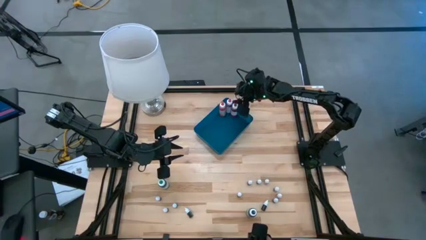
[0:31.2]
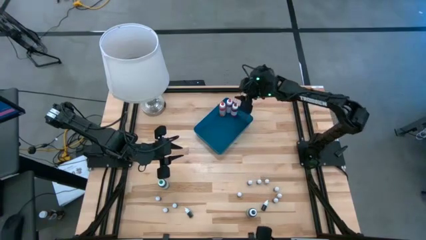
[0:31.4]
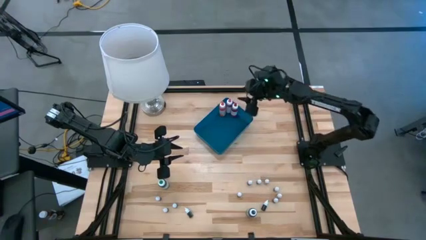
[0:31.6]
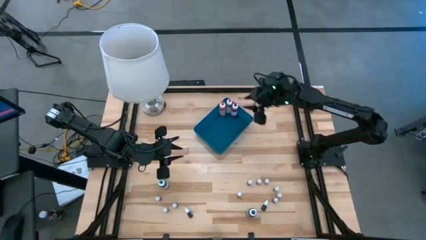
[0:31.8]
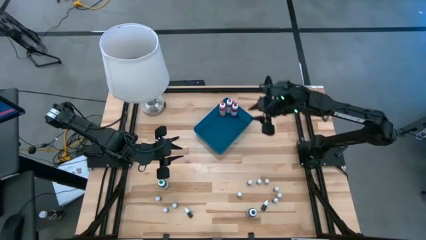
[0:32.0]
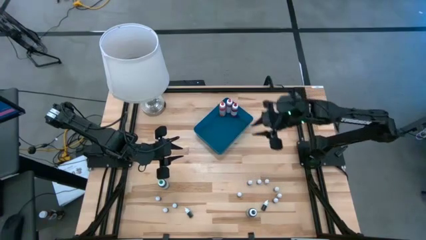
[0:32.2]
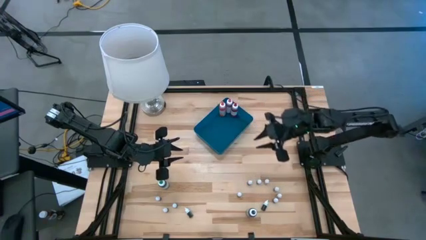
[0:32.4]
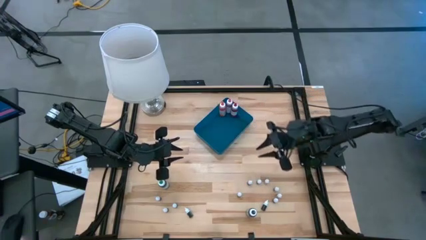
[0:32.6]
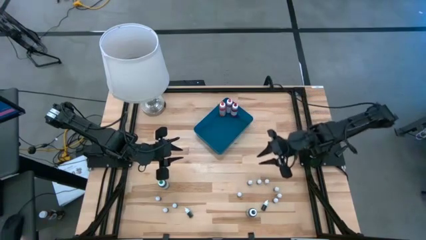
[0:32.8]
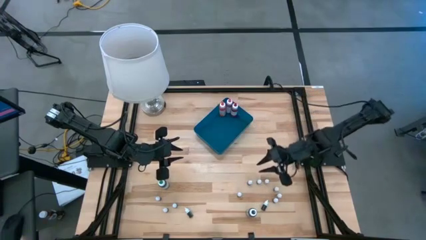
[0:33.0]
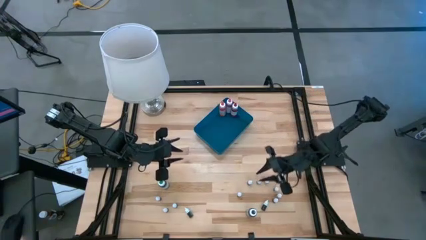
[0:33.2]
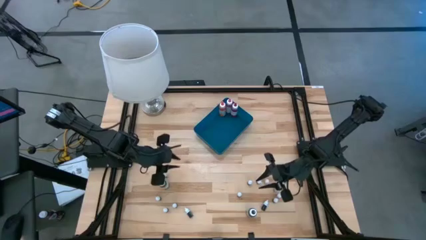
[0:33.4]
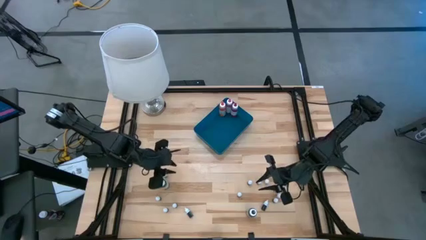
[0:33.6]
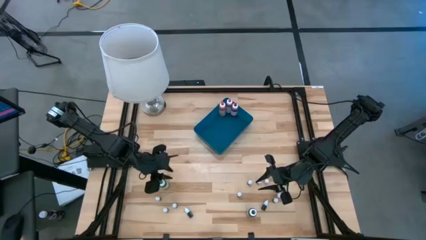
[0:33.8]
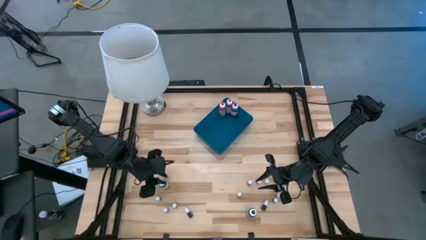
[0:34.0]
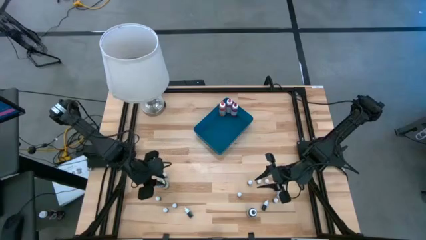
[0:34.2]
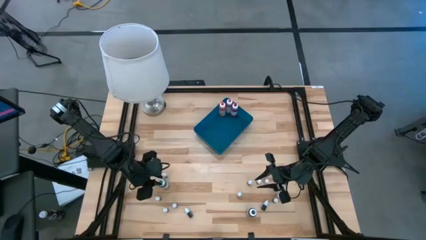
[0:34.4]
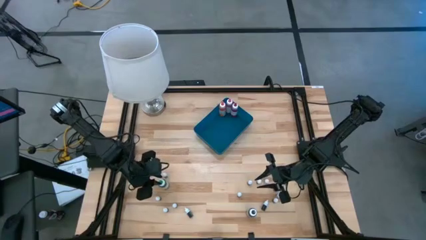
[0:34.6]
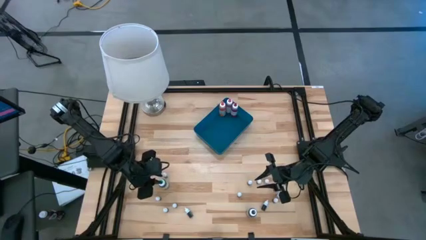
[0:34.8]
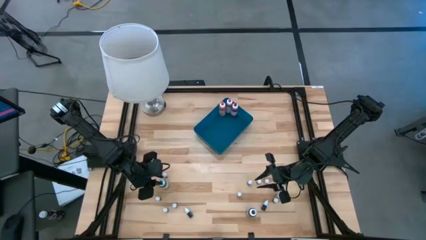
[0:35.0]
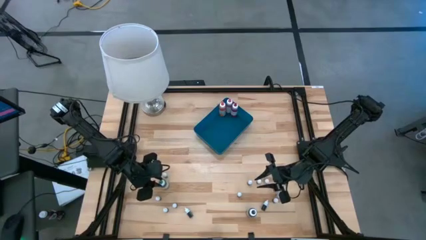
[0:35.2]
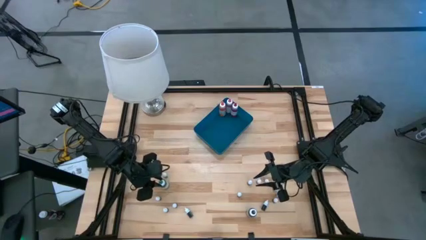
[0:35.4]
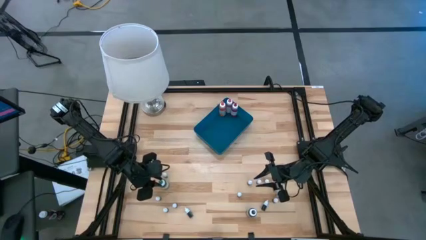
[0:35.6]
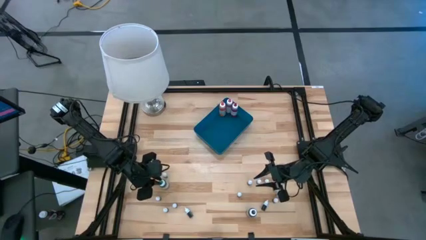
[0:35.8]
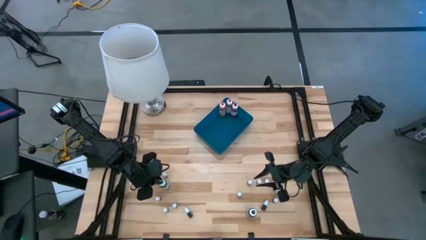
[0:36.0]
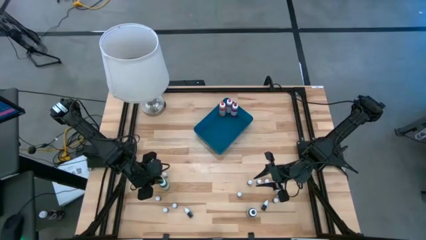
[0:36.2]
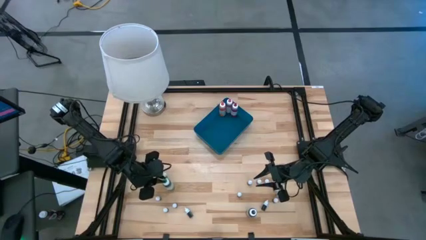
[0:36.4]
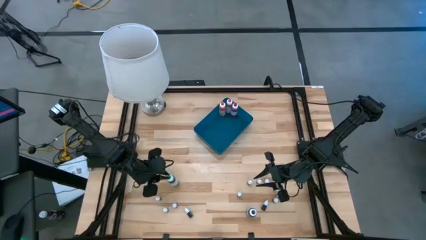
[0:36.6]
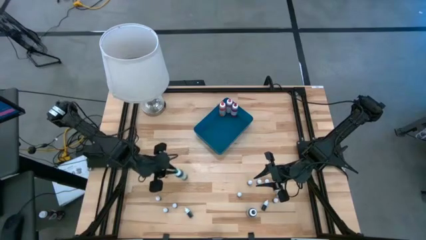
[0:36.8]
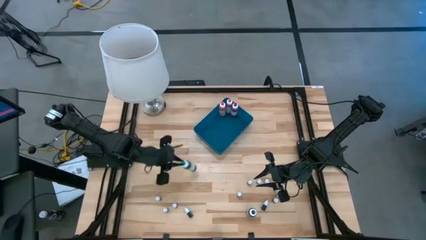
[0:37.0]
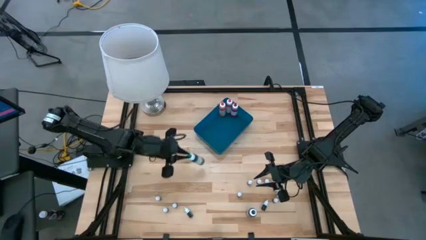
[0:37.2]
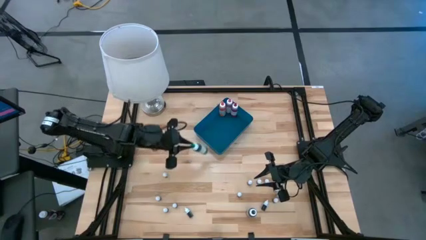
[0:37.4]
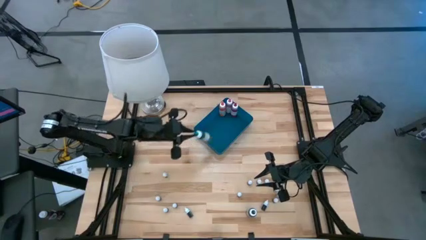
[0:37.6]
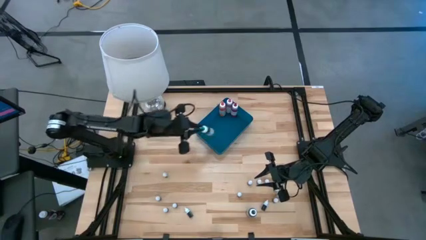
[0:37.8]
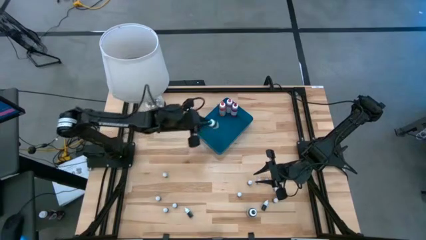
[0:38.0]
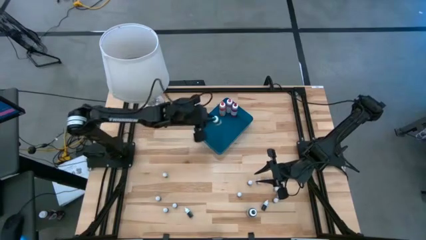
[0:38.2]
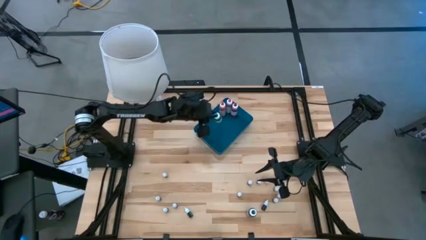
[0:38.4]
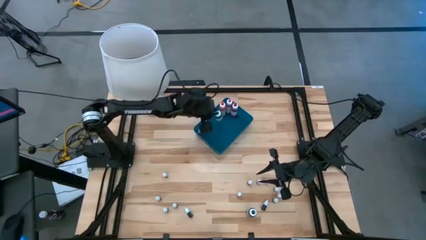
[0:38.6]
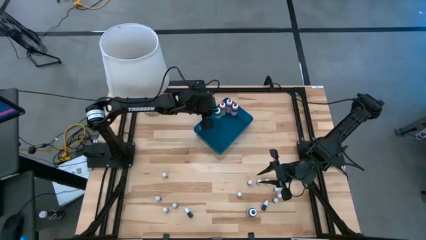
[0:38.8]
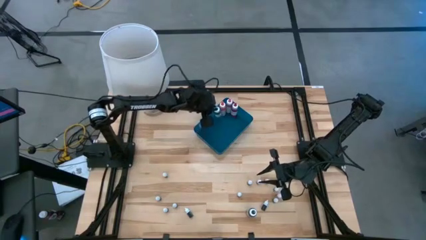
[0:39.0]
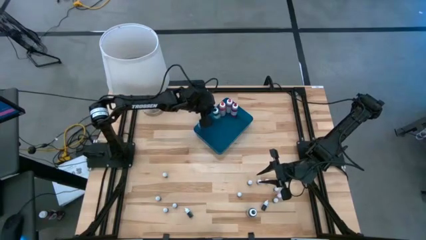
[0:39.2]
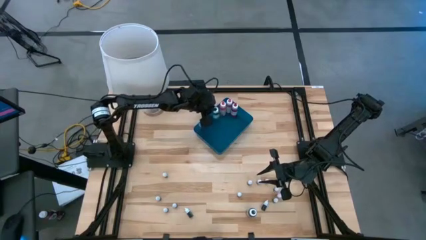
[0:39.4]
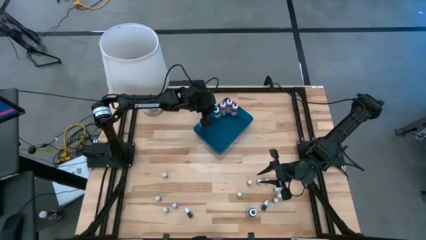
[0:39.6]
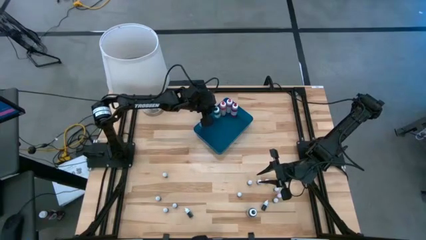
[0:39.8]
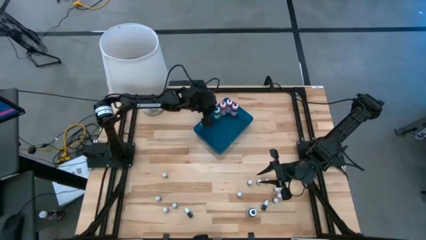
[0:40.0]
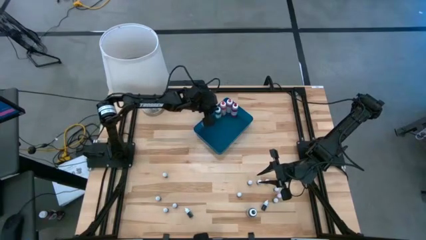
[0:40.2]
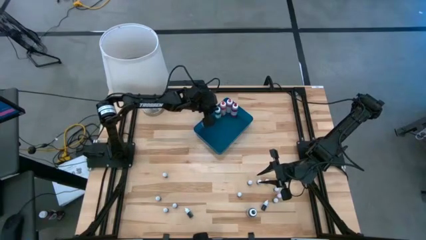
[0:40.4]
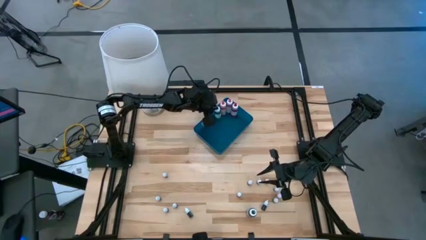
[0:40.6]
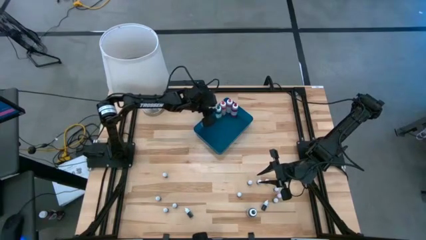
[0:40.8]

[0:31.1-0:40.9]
Task: Pick & Place food coloring
Put the large green food coloring bottle into the blue container

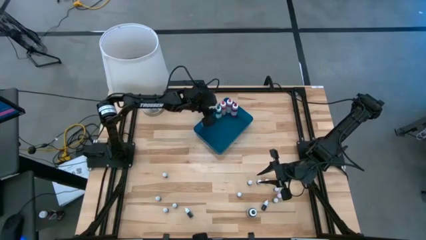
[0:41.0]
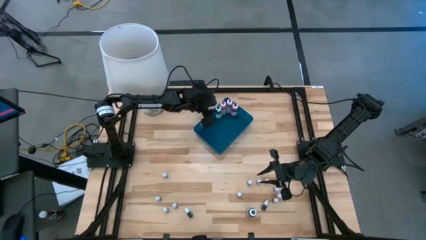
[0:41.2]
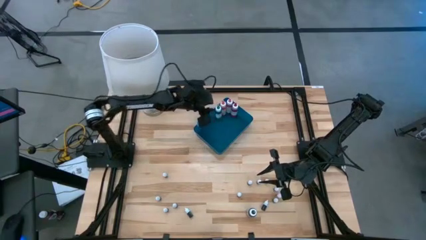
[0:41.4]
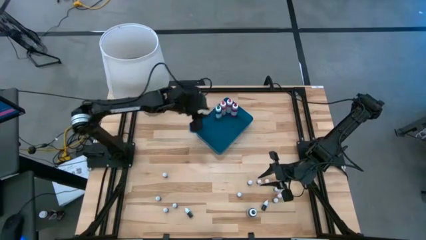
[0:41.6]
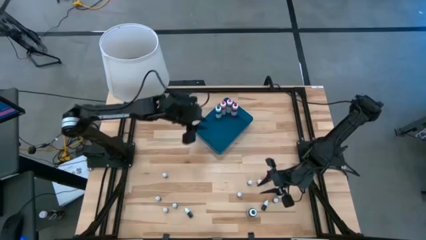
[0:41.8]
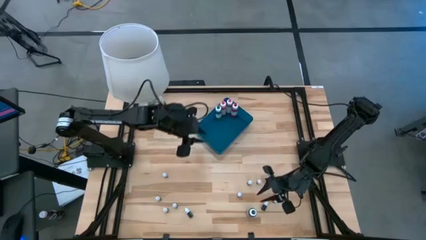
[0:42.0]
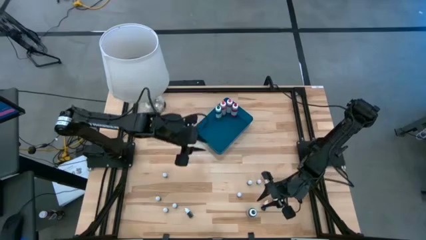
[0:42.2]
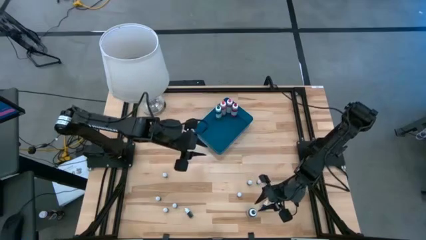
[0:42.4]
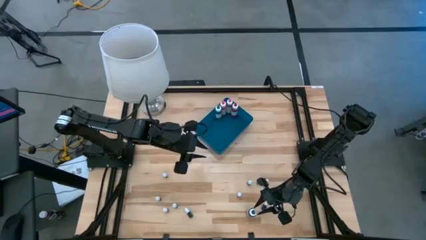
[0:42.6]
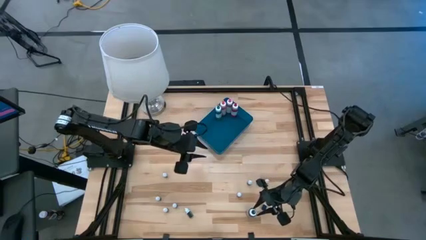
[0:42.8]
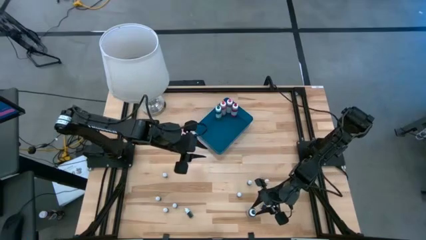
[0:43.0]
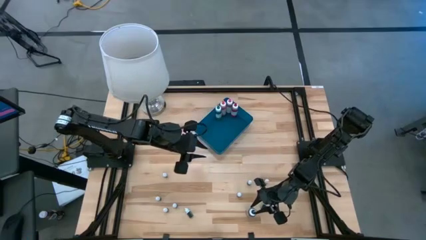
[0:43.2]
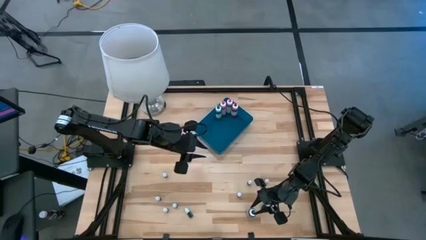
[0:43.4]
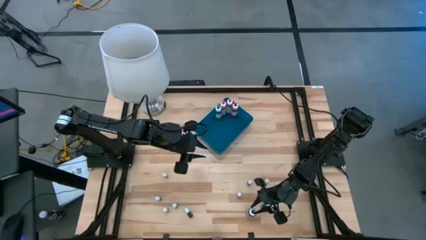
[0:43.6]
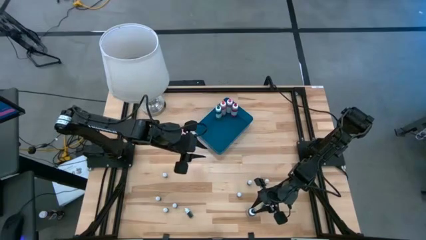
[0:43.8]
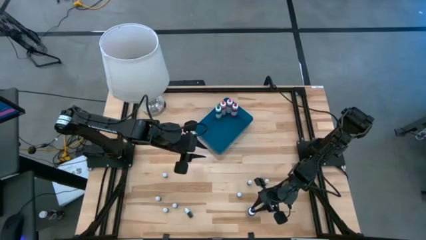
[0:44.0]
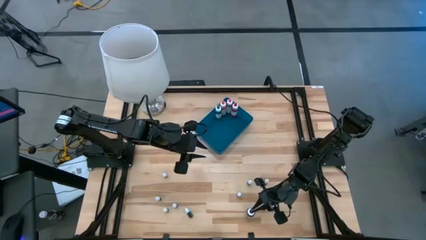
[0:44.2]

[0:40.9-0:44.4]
Put the large black food coloring bottle into the blue container
